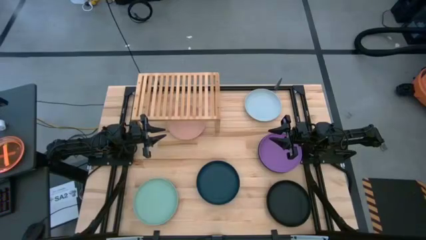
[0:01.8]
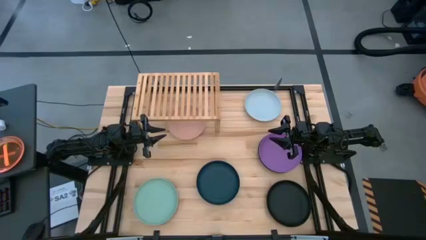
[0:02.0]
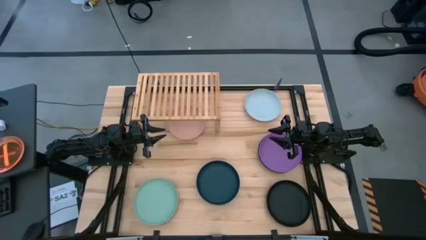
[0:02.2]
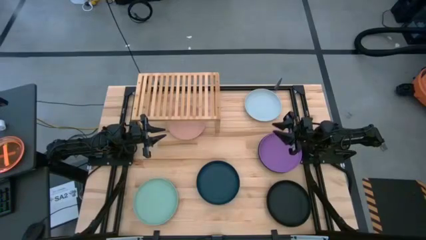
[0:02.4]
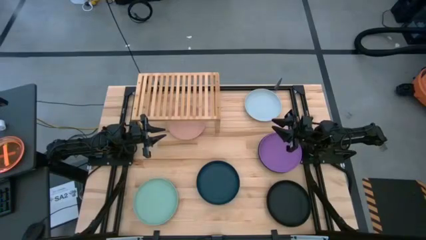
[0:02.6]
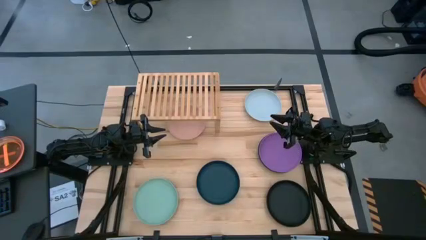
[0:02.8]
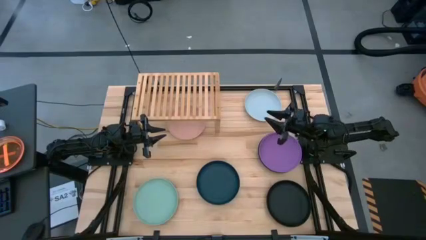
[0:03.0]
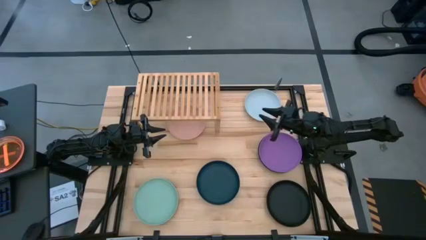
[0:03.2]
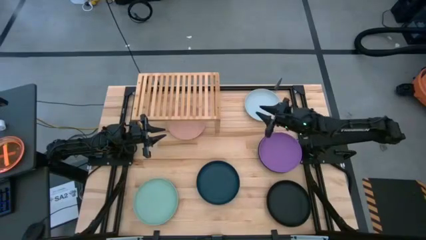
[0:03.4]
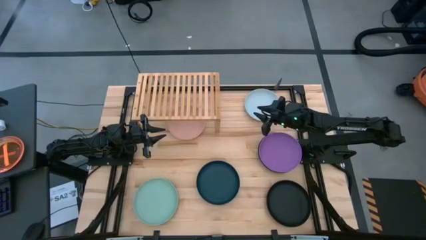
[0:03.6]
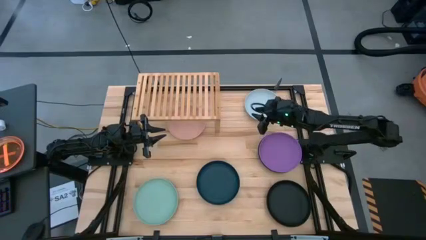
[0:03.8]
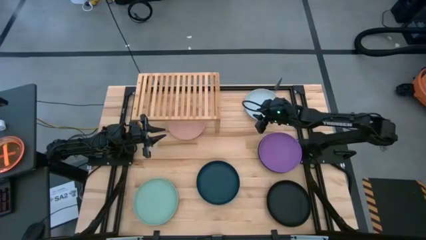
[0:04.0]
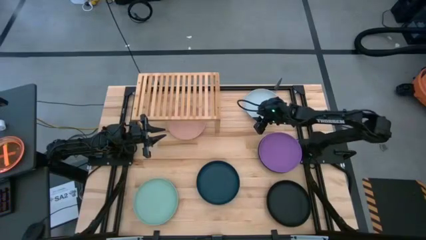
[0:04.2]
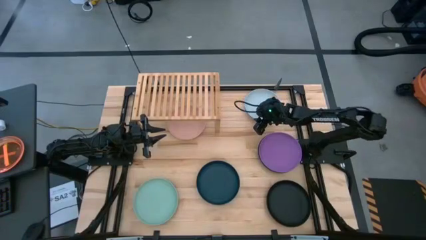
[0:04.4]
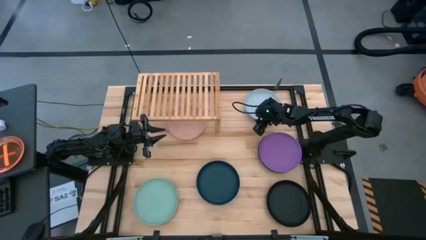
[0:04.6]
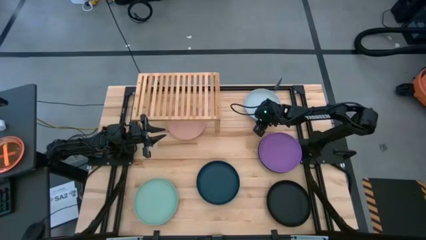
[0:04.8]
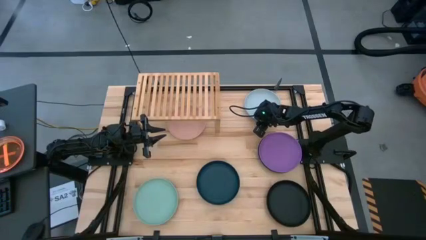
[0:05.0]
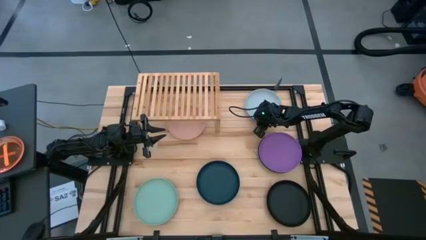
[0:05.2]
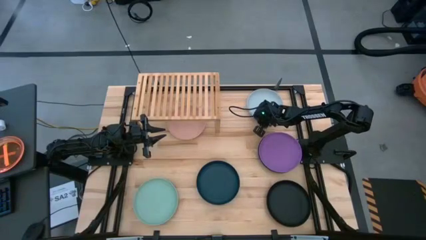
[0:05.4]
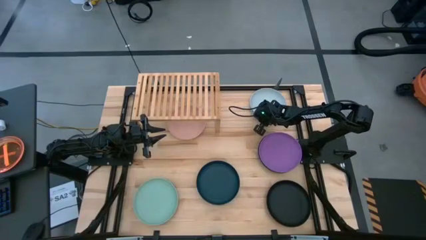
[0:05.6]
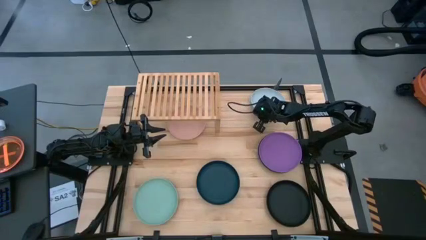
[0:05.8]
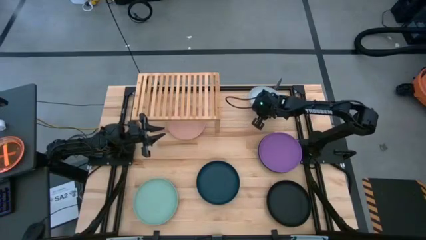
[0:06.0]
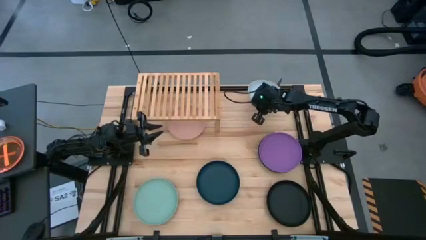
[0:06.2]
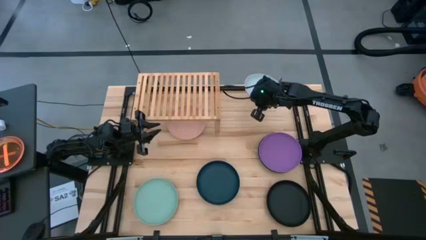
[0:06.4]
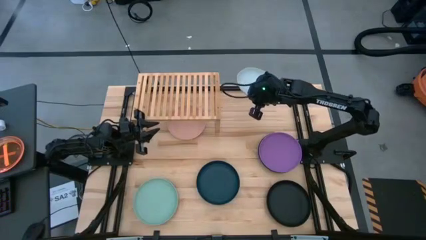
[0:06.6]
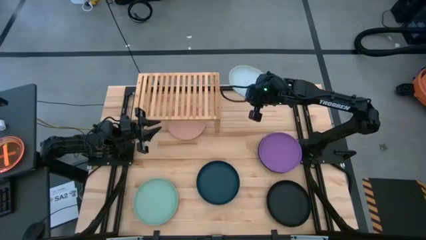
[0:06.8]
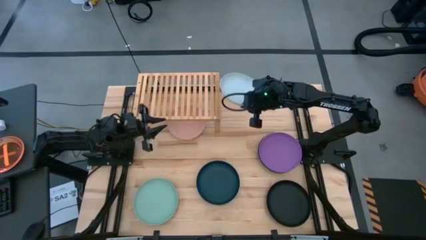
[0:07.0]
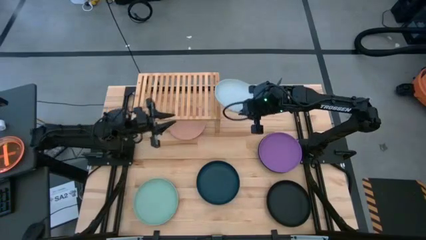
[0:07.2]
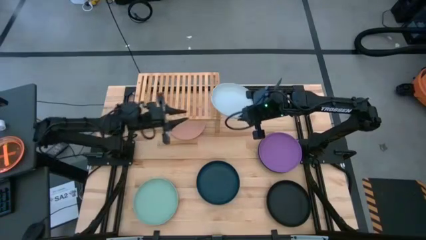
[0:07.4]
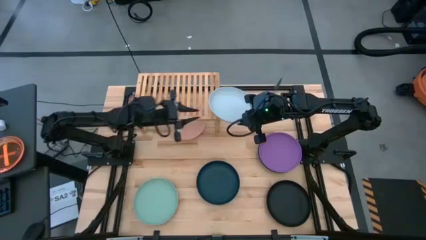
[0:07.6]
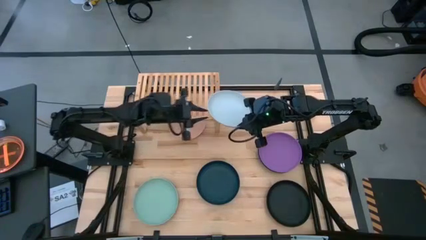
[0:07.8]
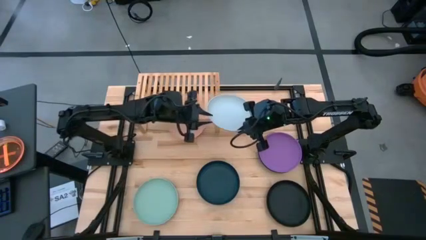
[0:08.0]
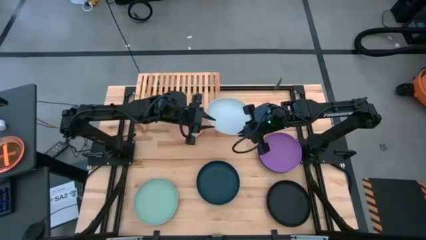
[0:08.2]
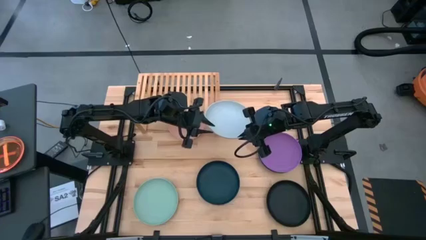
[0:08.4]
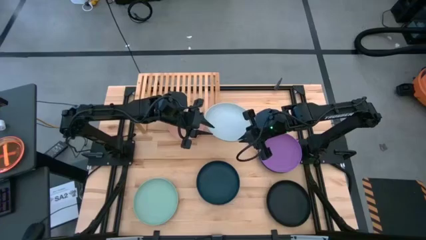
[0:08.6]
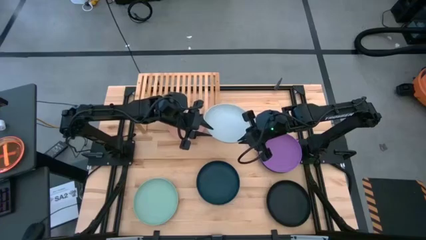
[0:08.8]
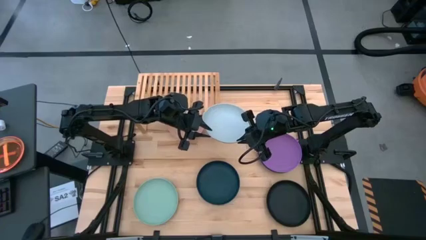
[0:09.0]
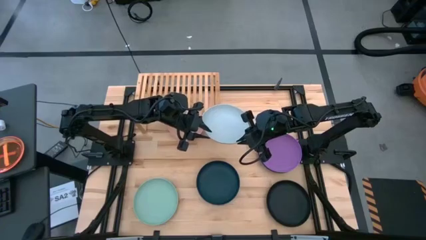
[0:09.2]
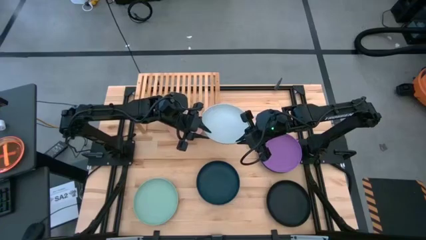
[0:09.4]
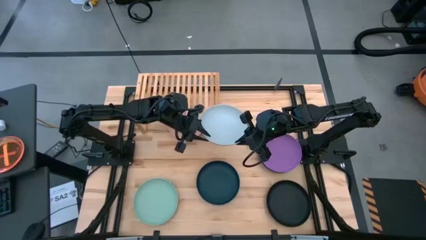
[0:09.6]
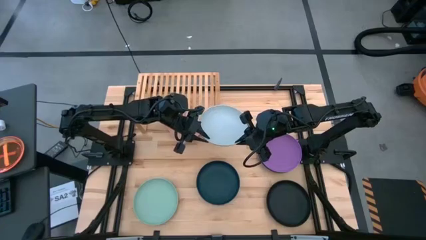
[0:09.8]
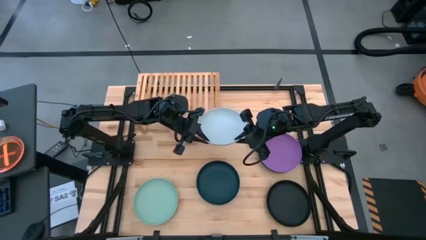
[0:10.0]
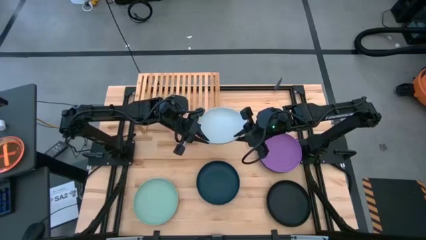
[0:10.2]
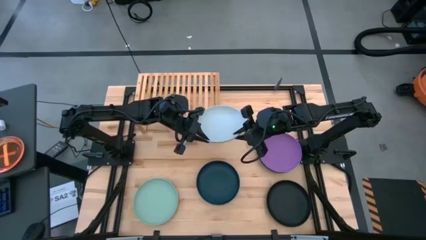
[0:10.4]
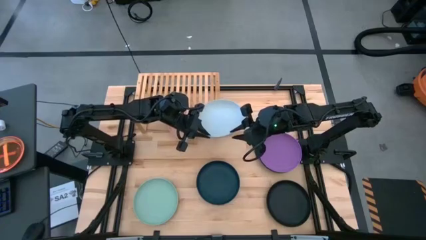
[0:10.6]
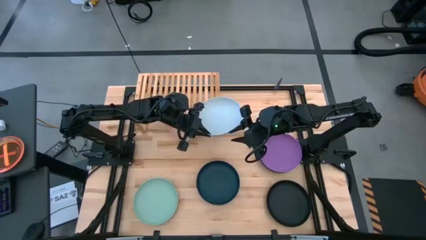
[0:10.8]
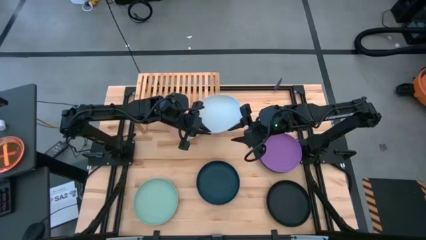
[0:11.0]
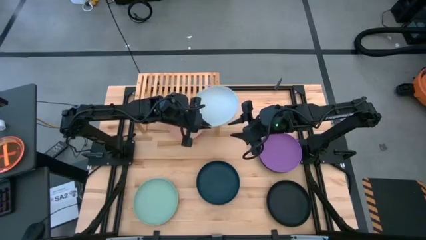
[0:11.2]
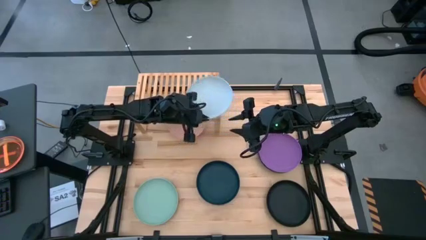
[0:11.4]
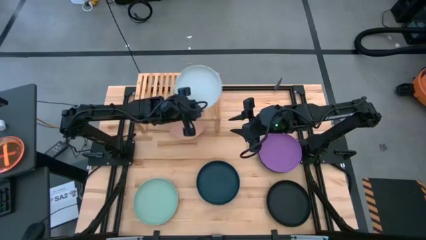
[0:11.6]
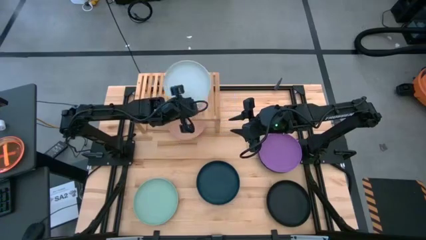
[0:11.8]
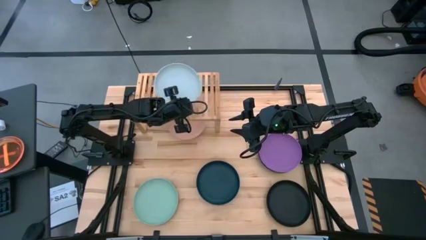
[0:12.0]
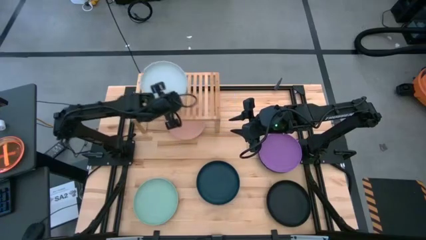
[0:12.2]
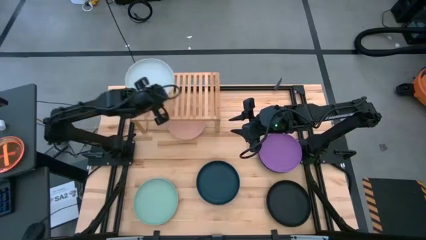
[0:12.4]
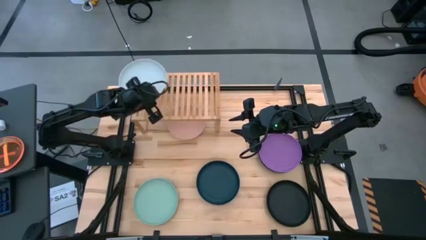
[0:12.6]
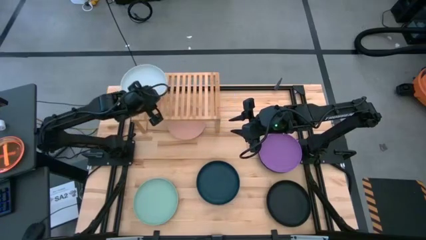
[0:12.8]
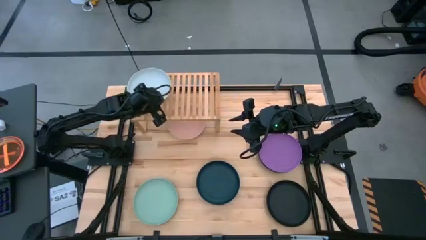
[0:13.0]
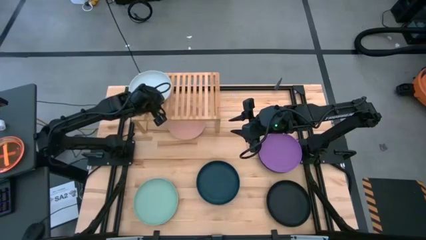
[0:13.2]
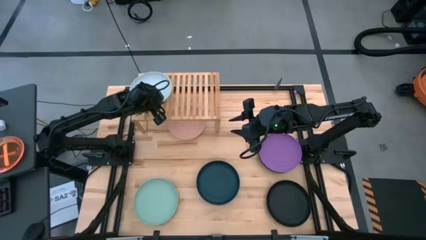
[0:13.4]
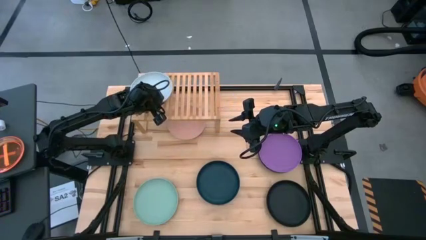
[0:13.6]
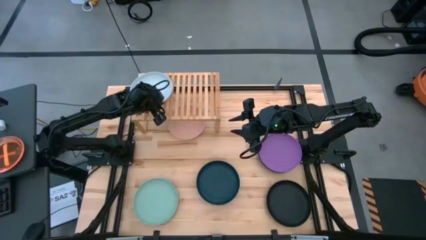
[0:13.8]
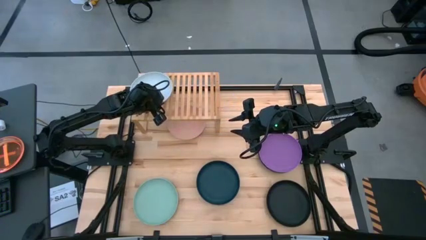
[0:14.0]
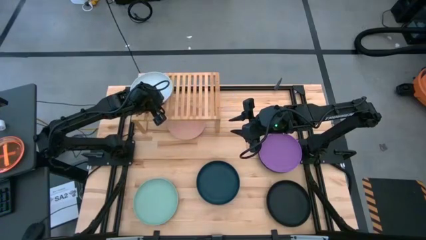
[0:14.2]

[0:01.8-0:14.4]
Task: Place and stack plates onto a shelf
Put the white plate on the shelf
